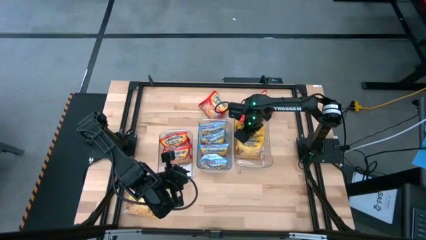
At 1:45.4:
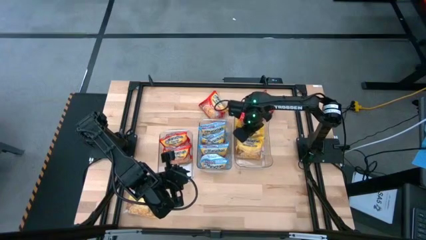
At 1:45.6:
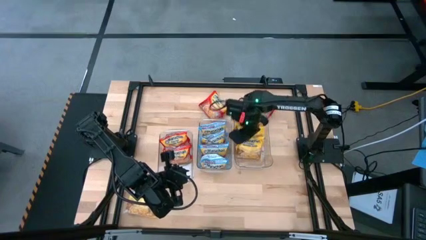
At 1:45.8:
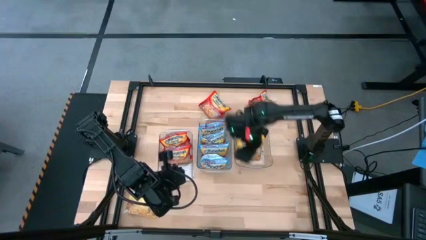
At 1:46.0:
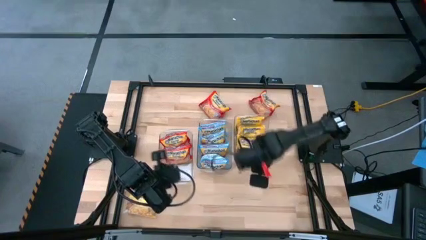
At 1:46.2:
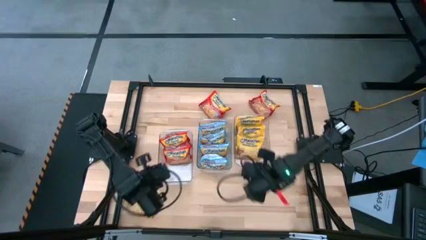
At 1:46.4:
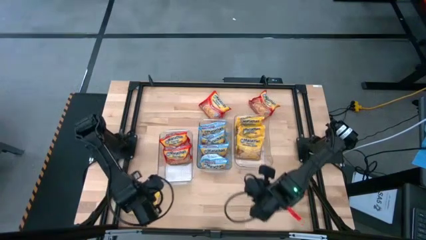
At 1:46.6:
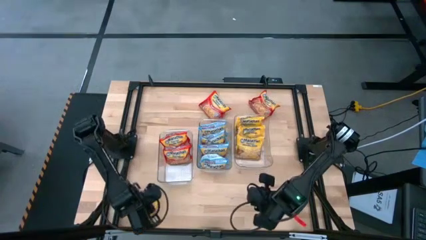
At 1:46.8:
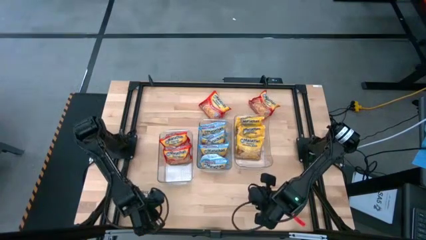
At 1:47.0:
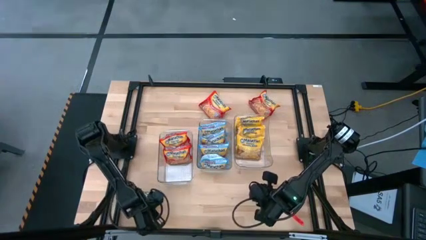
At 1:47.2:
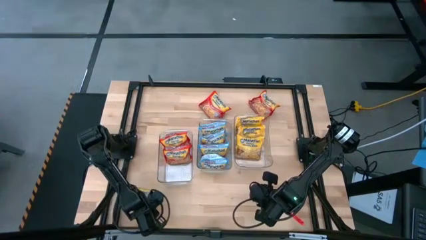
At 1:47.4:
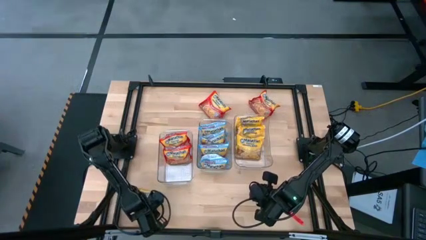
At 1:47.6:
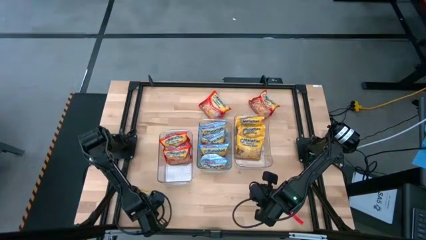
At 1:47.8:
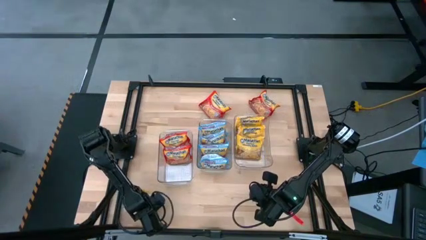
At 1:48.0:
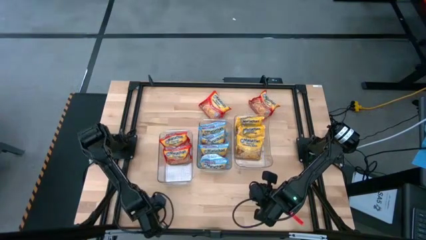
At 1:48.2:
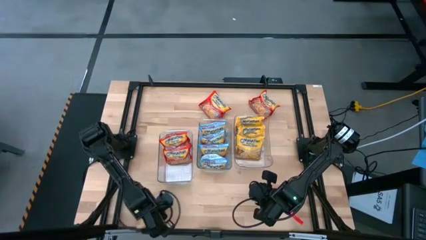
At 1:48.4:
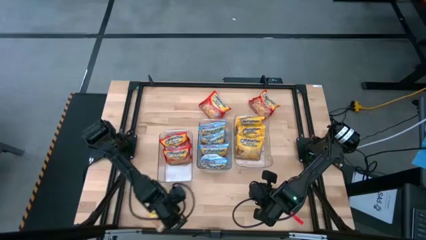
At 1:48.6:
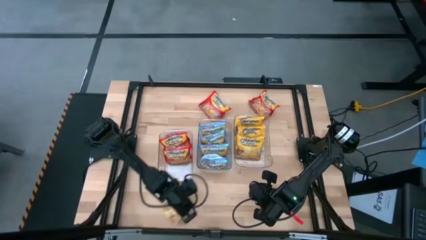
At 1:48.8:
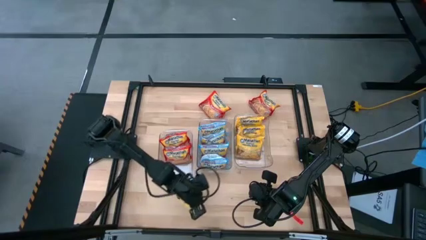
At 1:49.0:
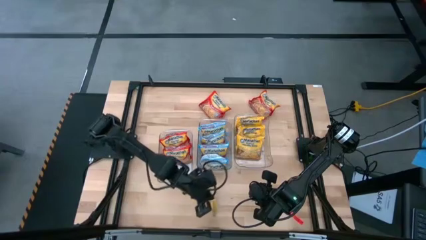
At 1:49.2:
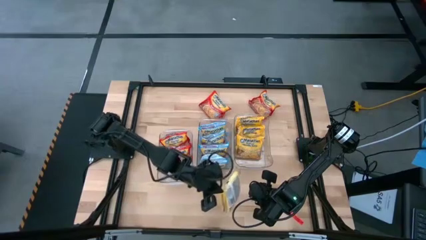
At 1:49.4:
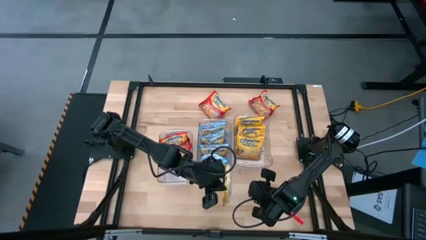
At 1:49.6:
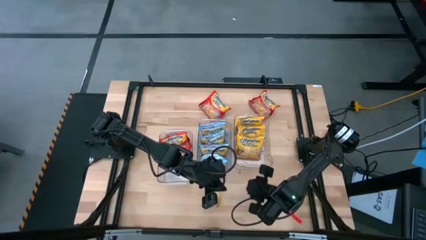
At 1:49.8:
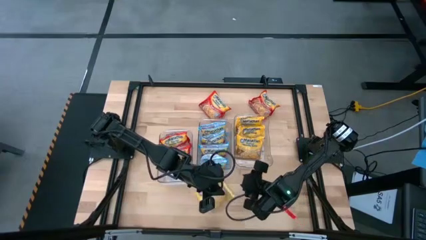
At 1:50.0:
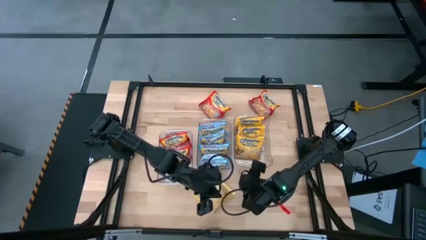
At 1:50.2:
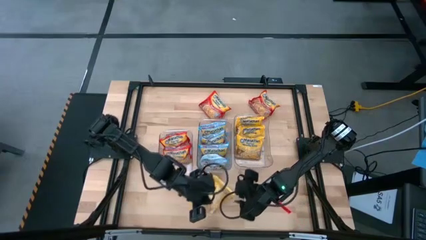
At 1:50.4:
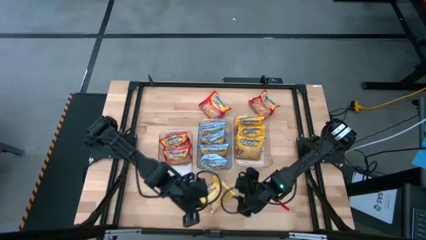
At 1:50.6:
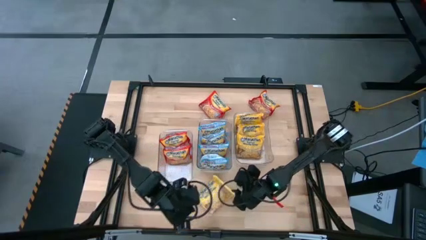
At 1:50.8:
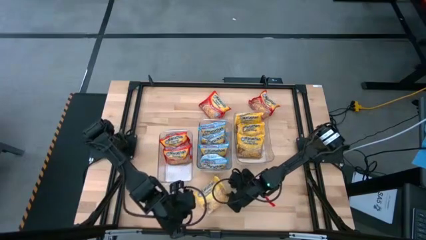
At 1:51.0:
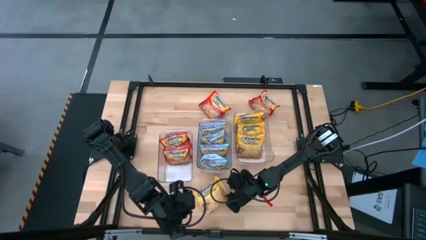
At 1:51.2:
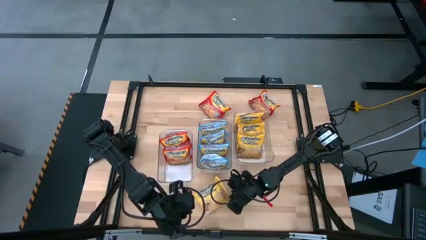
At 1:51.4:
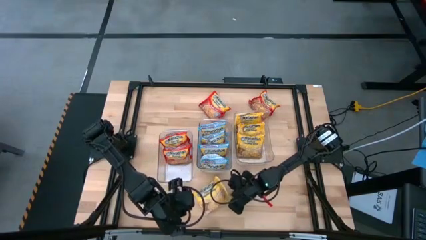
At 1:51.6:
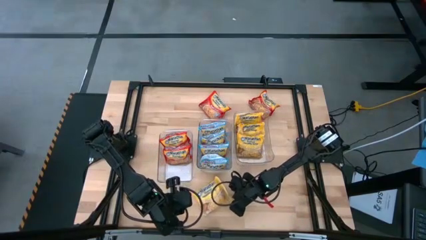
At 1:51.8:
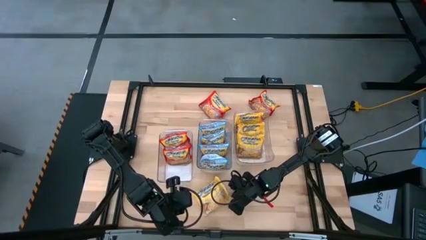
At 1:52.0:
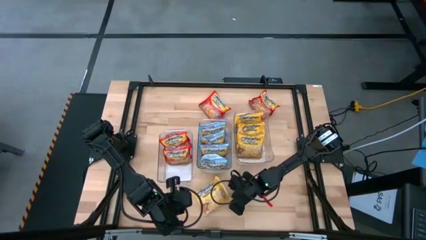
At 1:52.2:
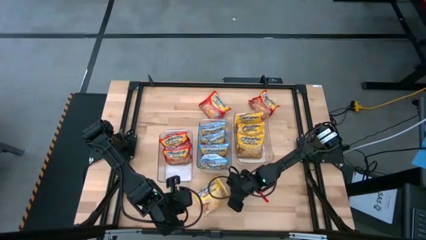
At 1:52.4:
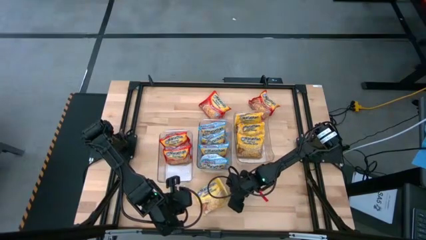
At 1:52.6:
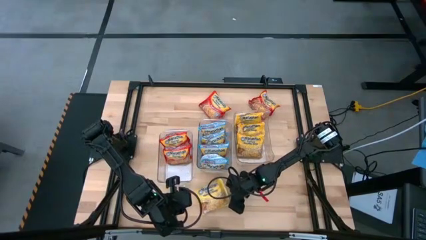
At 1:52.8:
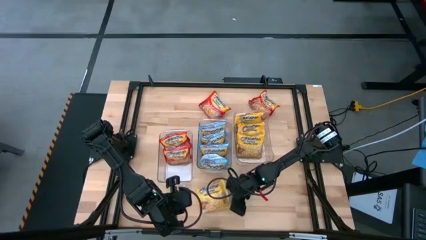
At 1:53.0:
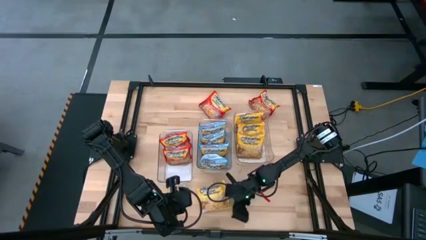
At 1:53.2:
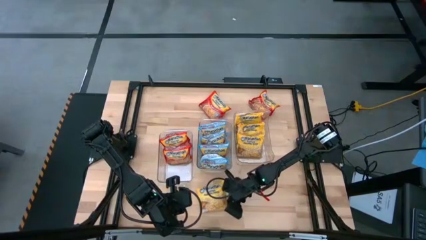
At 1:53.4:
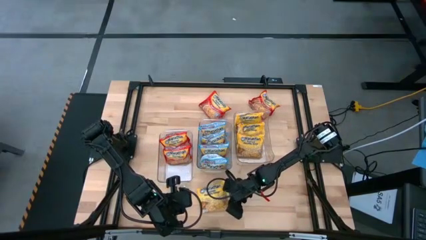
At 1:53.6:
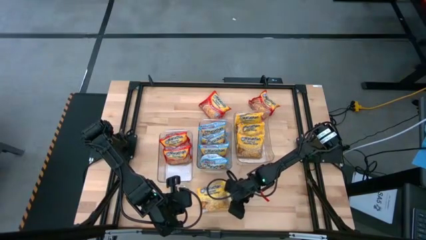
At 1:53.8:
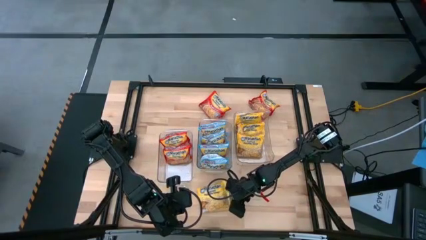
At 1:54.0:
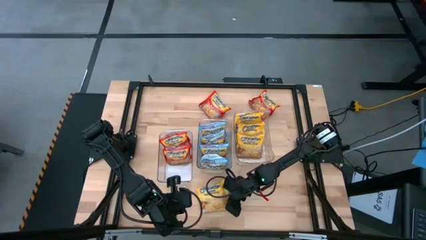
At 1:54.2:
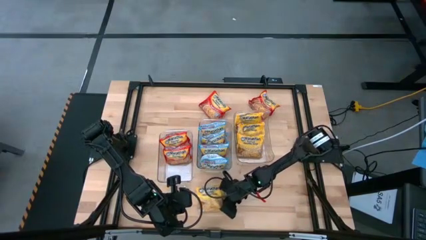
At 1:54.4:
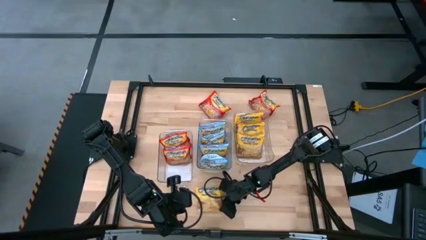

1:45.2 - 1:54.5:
Task: Sort Maruchan noodles
Put the yellow noodle pack into the right transparent bin

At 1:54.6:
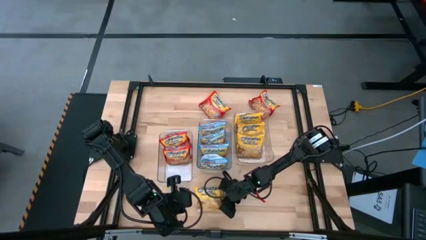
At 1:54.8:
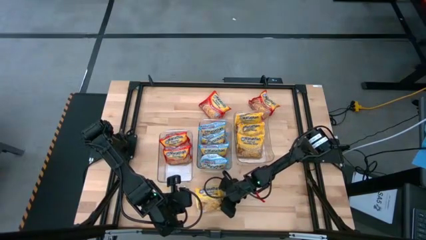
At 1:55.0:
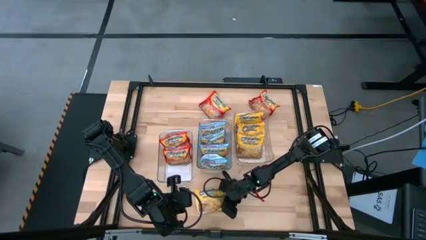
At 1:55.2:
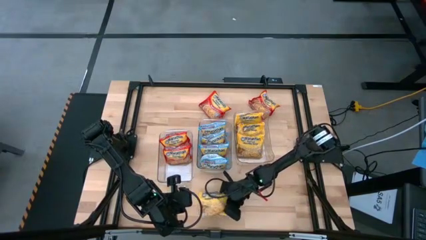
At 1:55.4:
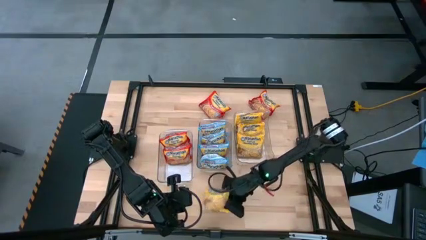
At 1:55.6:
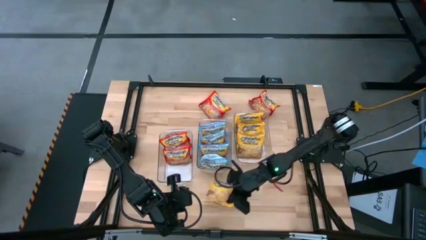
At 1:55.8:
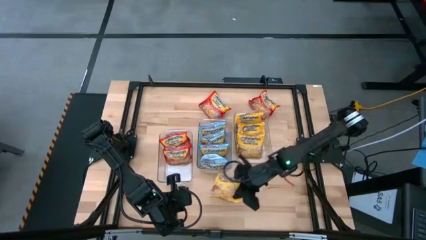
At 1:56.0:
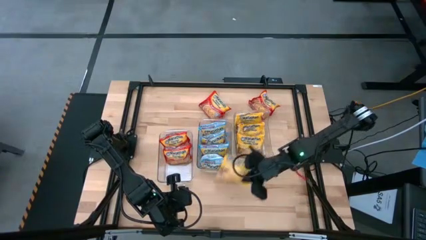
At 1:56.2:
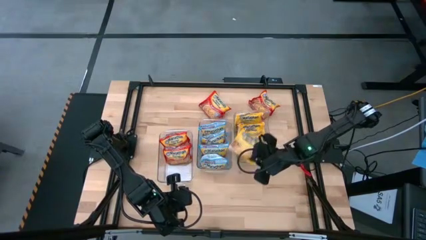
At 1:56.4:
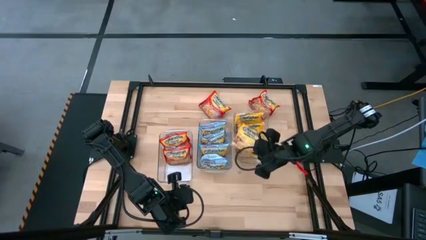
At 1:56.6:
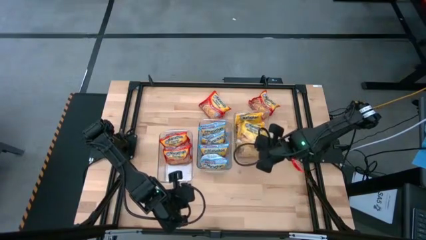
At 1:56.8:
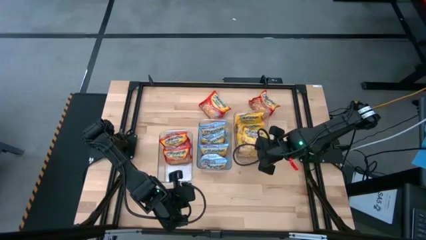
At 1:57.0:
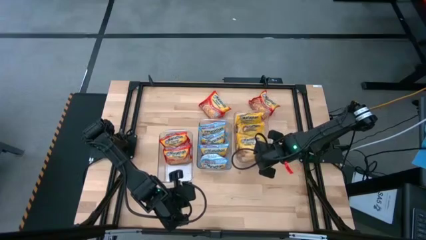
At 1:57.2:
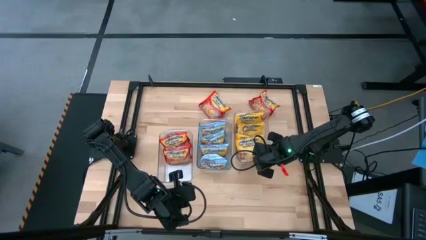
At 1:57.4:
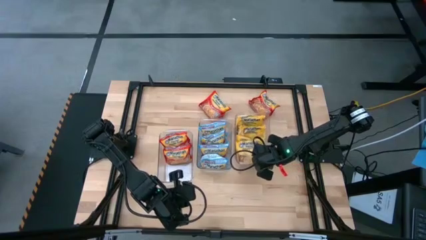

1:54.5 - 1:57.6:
Put the yellow noodle pack into the right transparent bin

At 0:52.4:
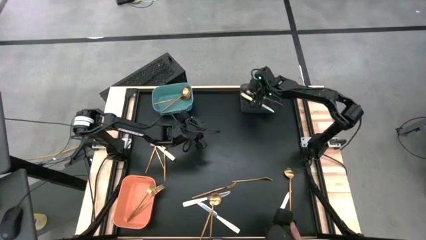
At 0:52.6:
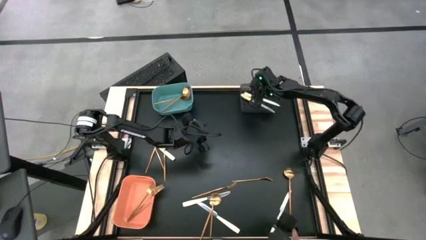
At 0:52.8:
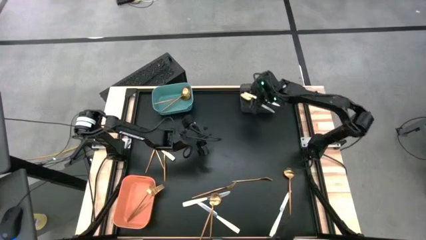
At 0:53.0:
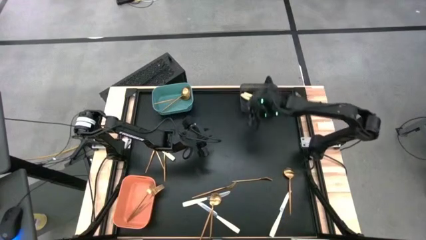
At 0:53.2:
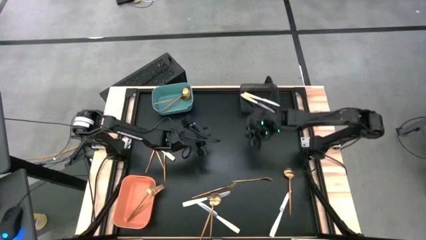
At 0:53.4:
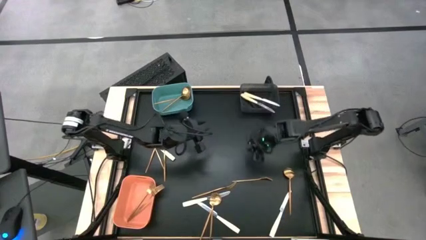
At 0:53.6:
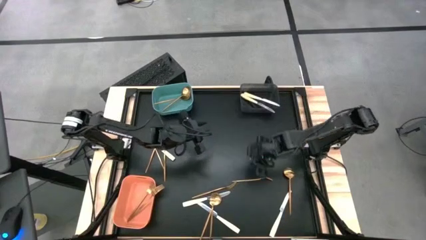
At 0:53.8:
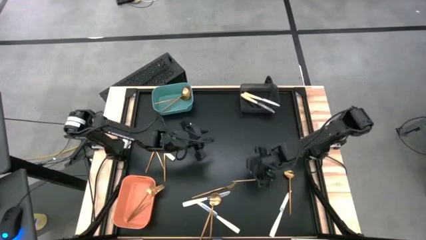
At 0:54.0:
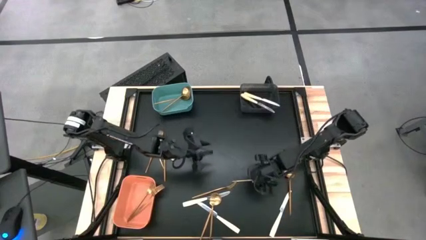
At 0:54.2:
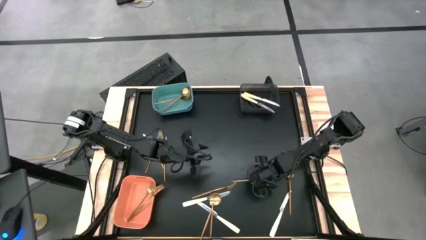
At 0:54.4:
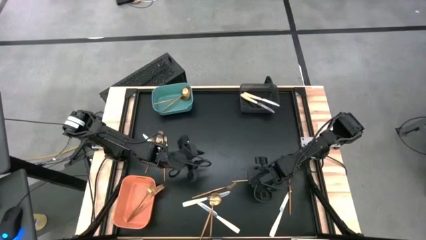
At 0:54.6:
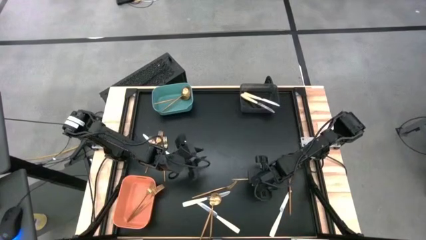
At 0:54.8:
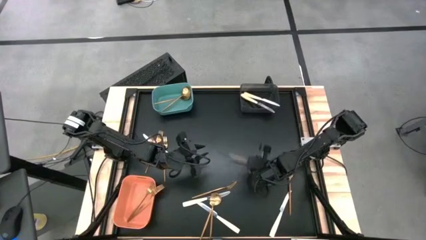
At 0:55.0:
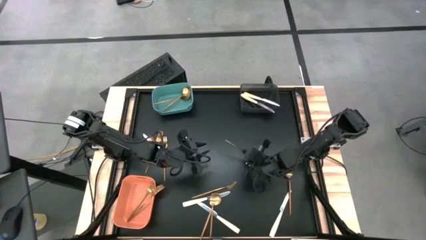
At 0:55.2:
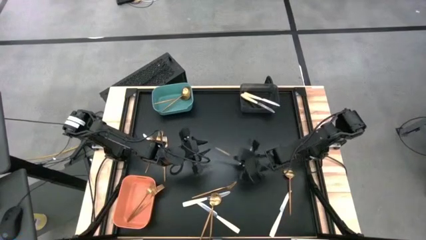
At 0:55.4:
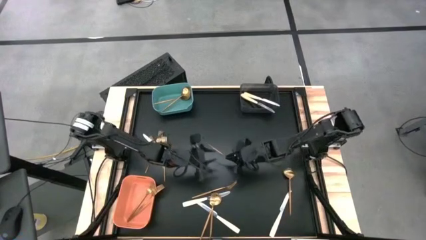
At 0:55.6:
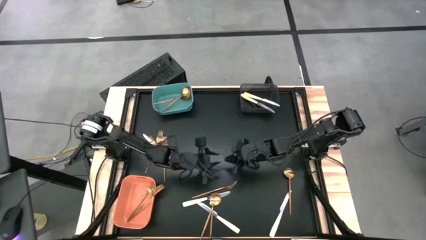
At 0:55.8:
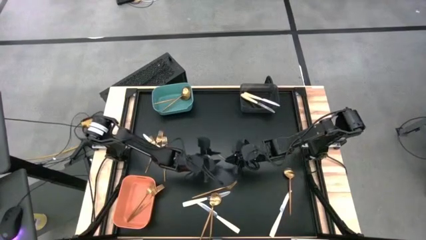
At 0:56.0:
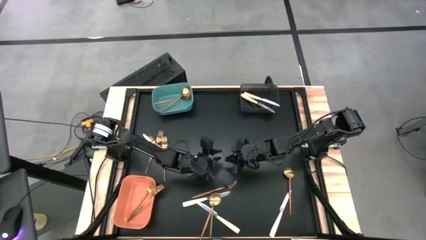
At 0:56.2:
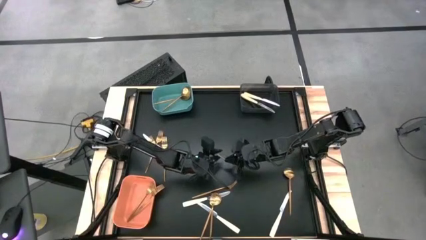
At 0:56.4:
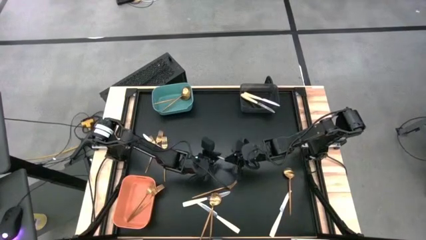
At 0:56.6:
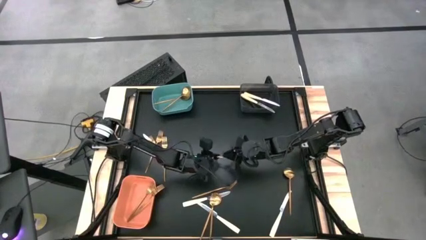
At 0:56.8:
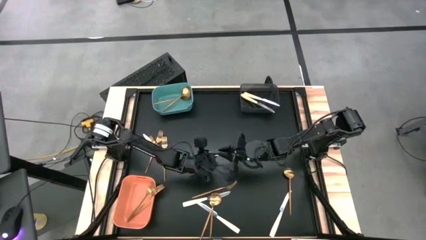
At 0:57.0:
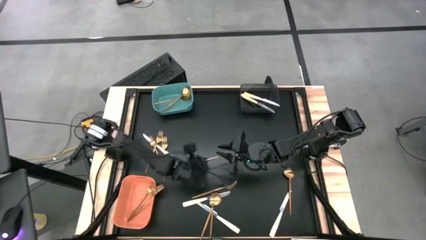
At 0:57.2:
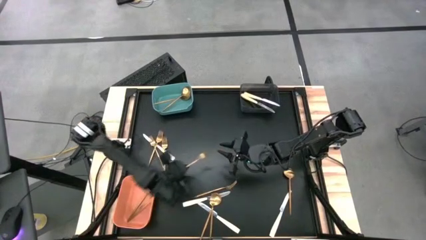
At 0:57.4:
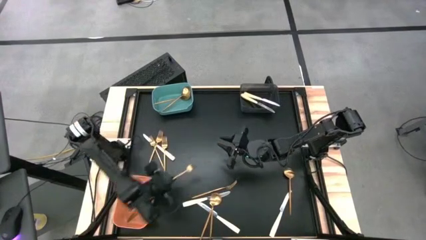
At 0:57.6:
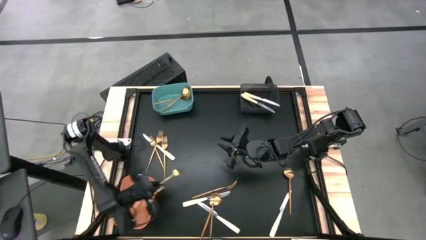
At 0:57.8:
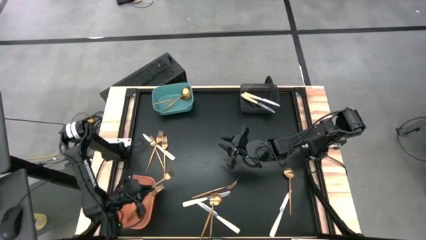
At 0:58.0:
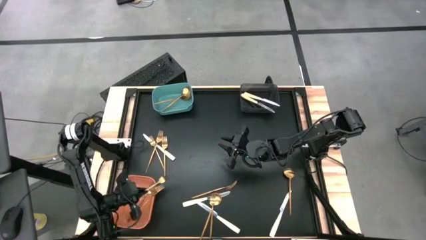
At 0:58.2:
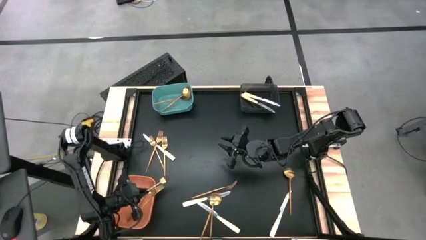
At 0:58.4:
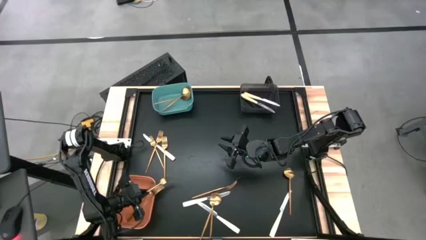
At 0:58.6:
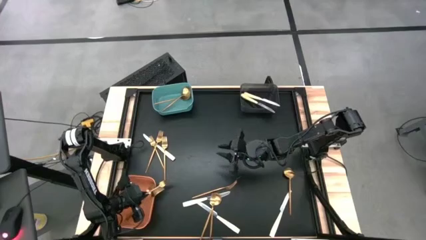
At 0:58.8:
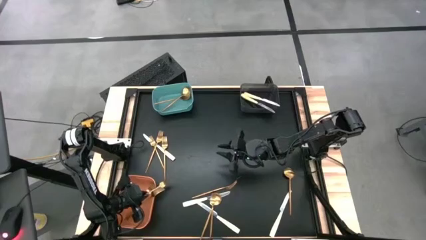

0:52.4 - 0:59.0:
Task: Sort silverware by color (type)
Put the gold fork into the orange bin
